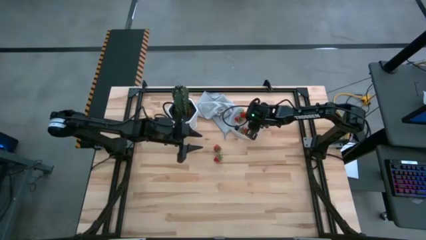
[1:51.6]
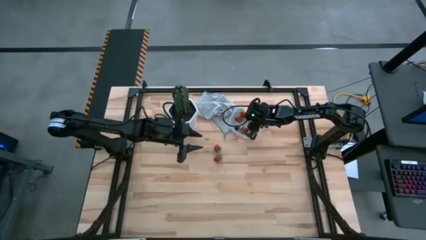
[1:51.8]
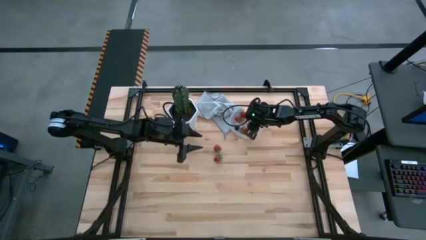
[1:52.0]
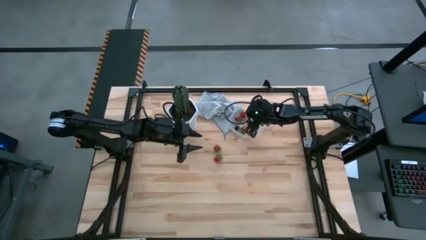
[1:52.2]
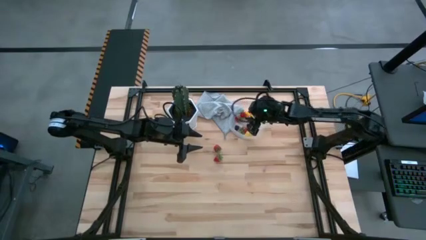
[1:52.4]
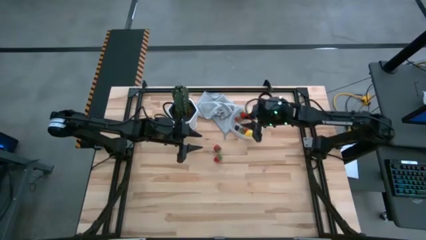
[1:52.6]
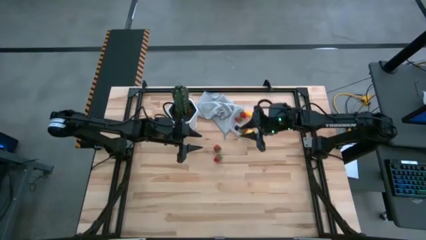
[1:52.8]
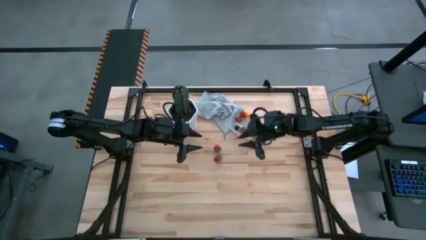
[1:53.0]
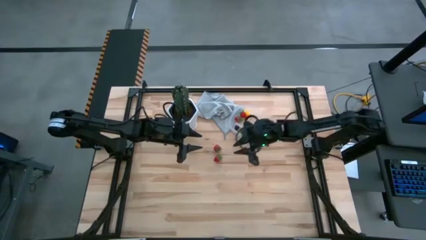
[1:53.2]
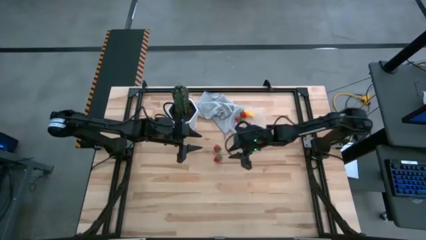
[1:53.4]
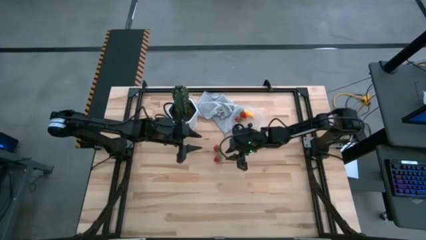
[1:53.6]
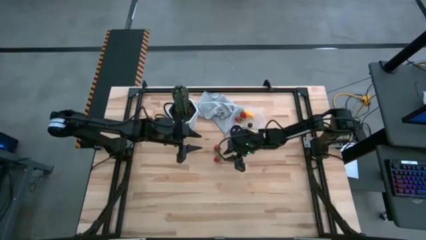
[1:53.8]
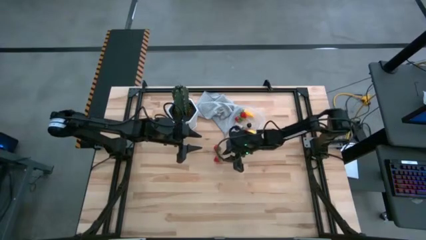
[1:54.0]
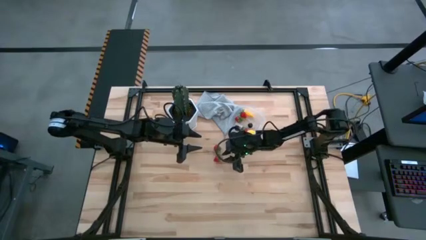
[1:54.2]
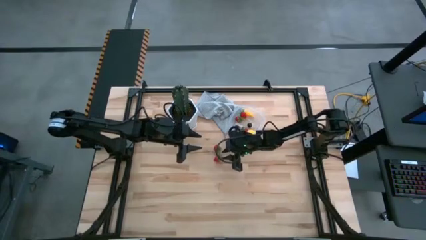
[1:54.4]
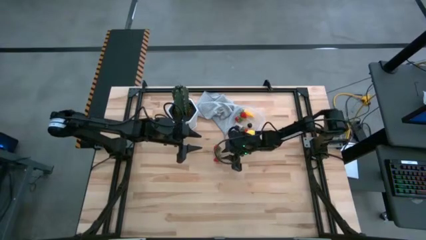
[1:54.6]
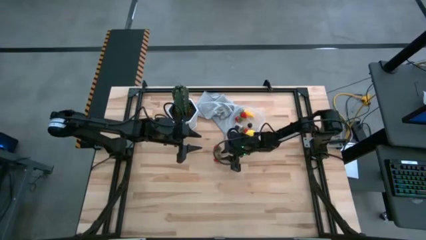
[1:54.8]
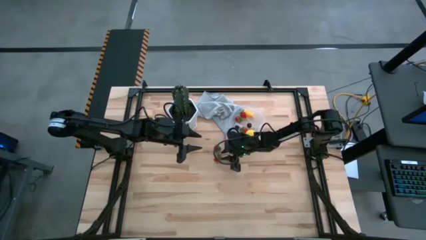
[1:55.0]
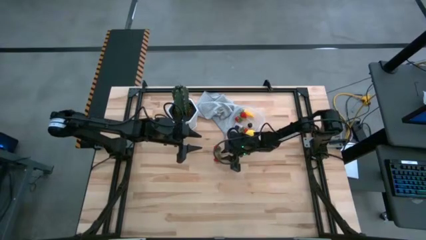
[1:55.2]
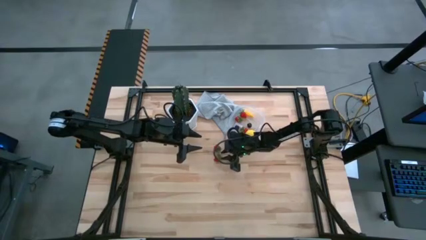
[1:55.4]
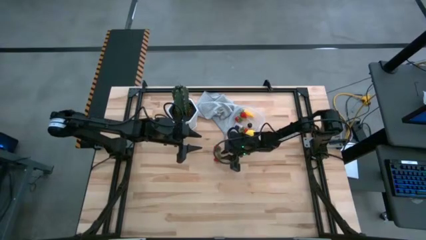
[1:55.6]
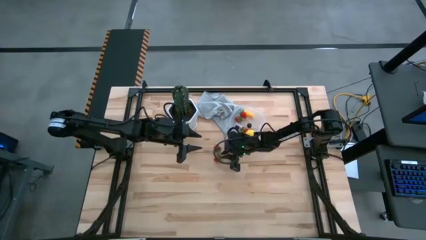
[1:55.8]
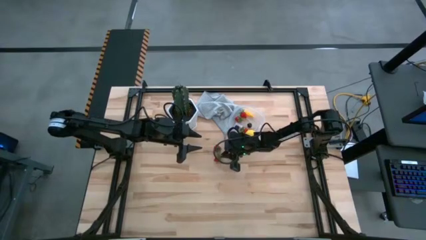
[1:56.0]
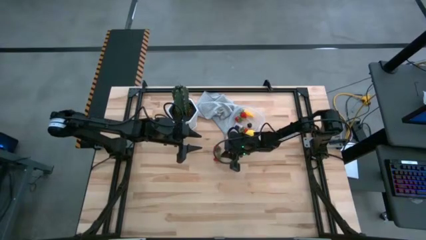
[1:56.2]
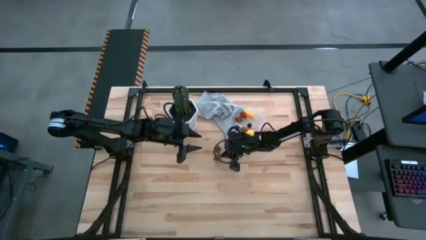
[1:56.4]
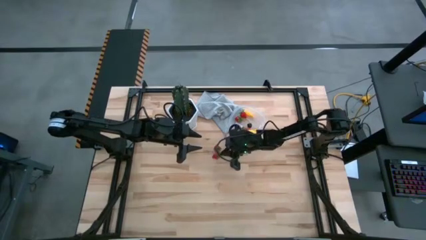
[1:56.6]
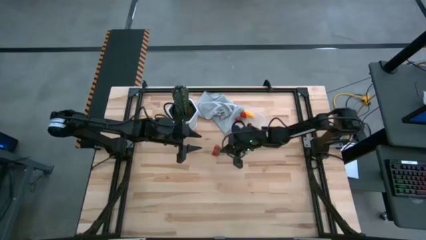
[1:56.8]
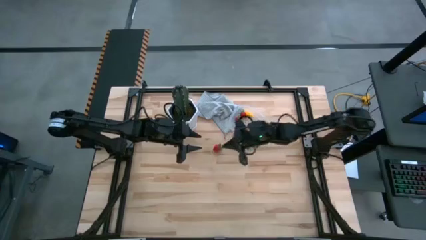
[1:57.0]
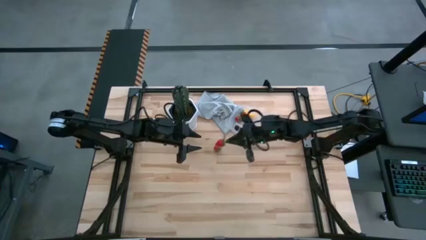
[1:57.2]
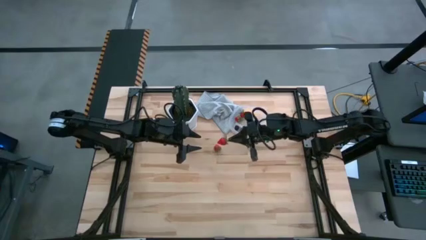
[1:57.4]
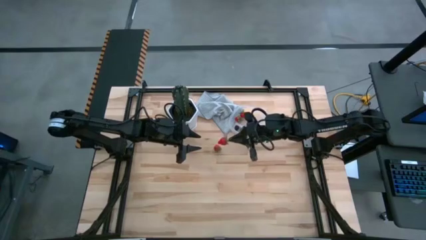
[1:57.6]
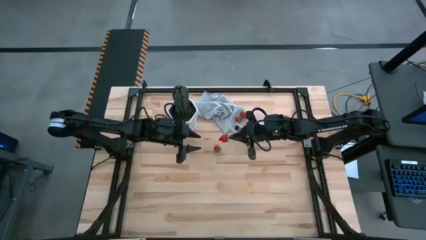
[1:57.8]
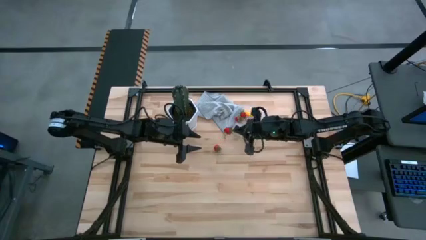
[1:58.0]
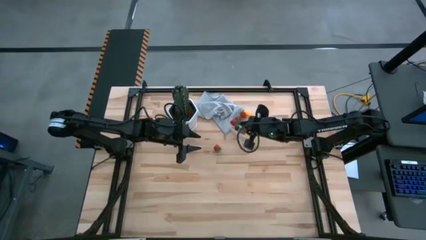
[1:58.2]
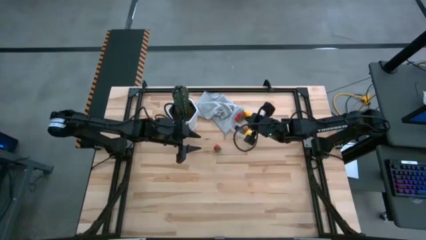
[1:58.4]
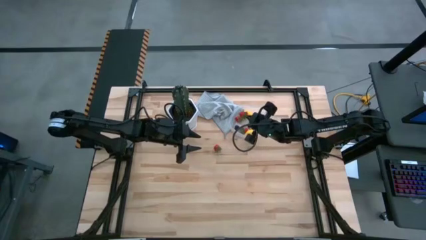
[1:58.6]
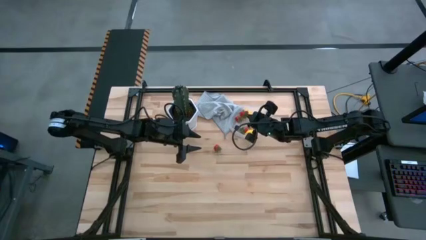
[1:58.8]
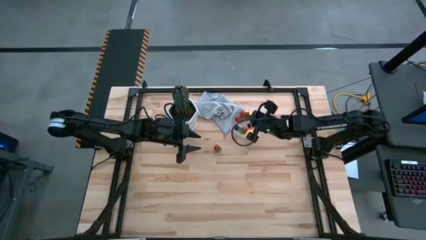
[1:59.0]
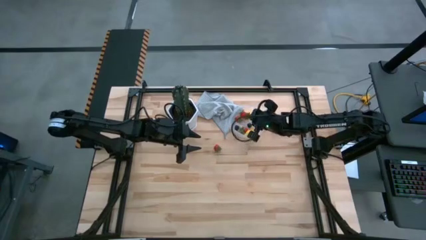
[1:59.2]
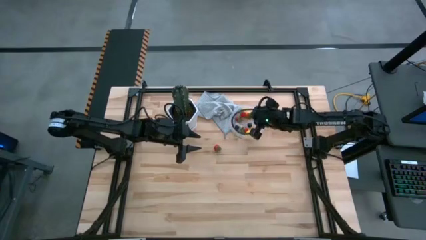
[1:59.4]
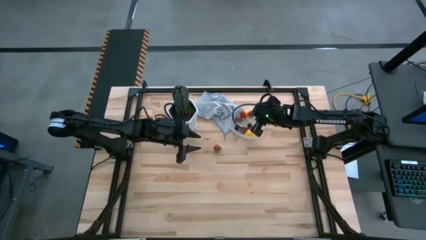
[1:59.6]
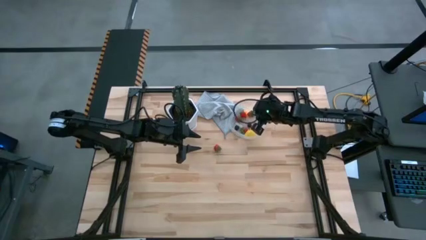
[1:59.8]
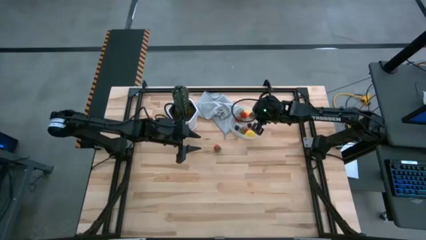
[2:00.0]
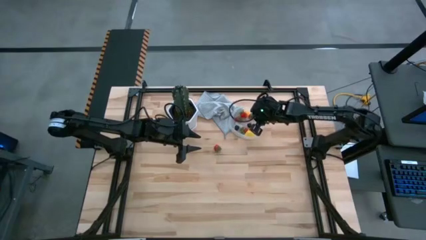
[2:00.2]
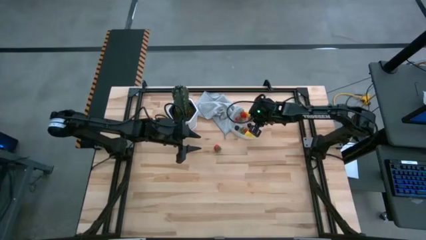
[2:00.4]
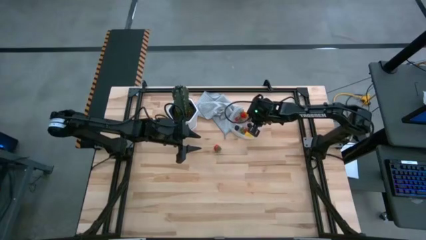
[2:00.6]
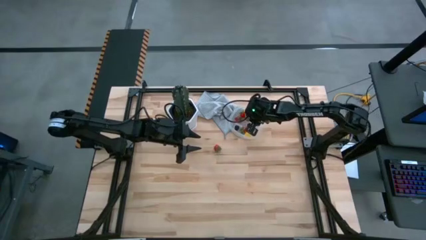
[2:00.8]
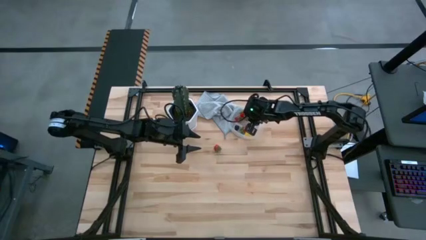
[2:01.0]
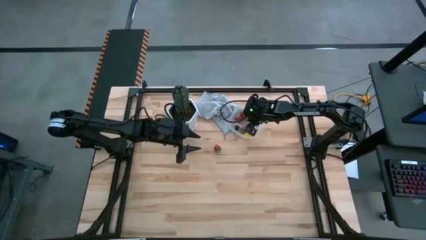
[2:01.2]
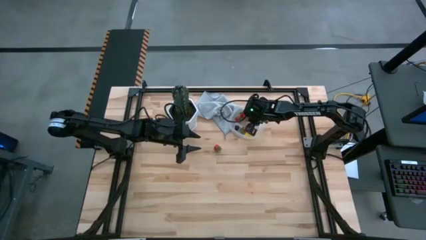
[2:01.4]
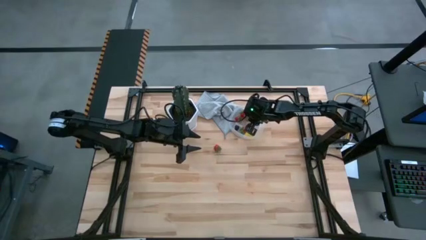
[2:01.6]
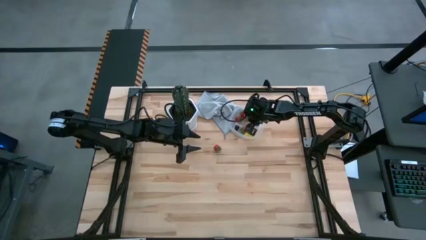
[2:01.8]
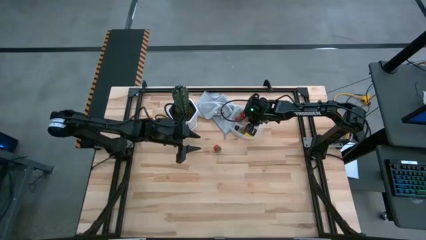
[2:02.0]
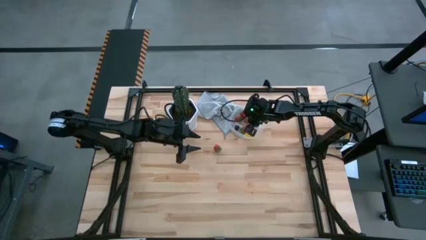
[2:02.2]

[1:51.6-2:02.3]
Task: Pick and placing Produce into tupperware
Put the bottom strawberry into the transparent bin

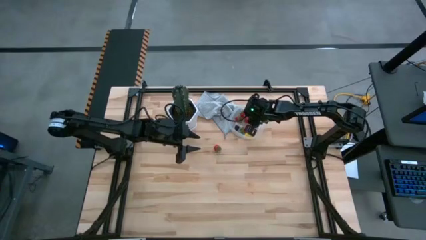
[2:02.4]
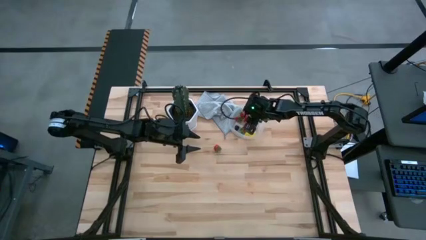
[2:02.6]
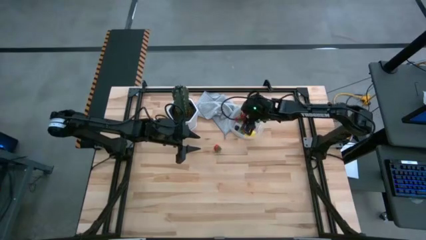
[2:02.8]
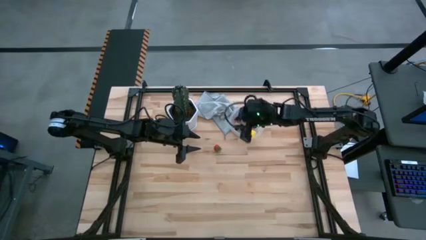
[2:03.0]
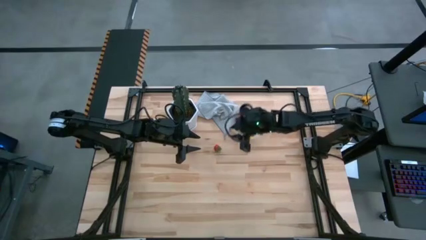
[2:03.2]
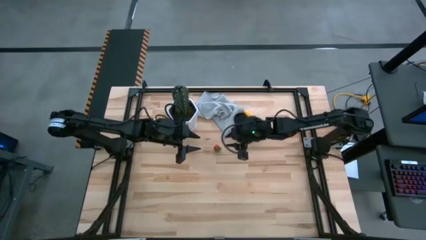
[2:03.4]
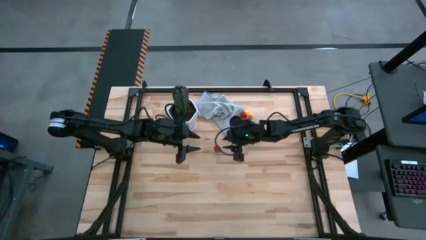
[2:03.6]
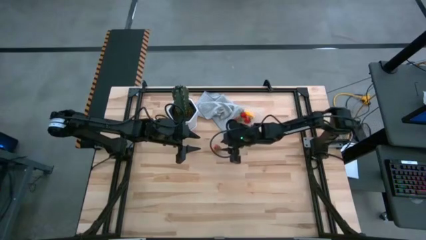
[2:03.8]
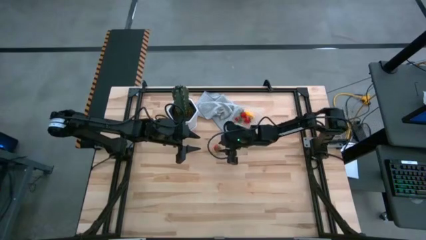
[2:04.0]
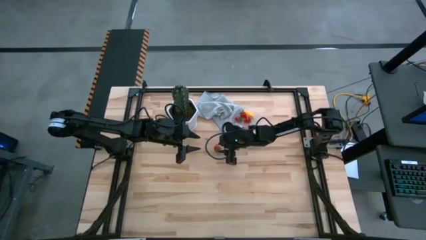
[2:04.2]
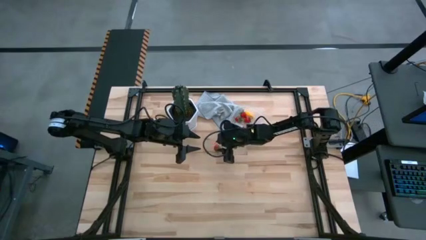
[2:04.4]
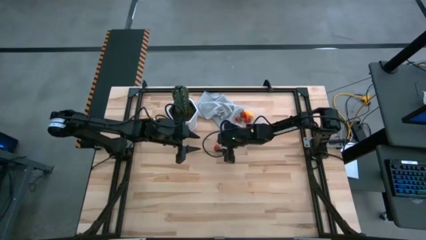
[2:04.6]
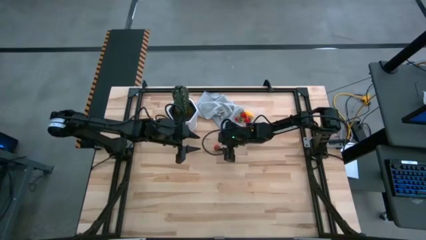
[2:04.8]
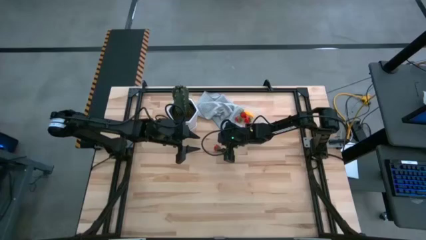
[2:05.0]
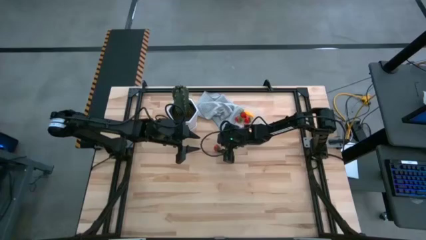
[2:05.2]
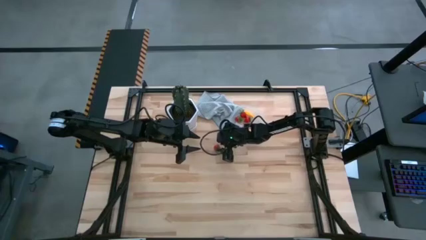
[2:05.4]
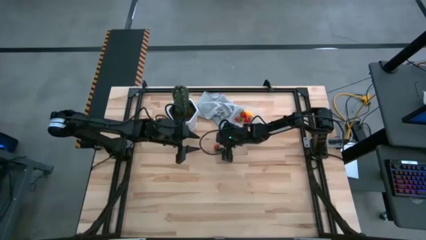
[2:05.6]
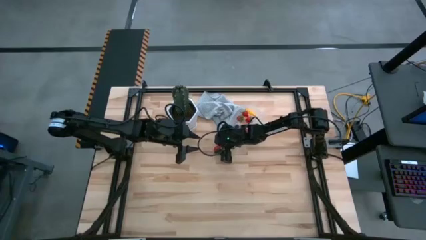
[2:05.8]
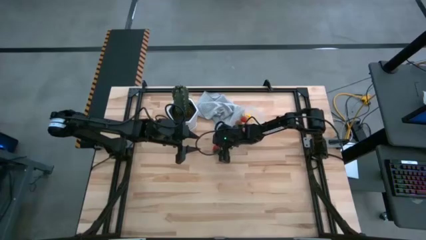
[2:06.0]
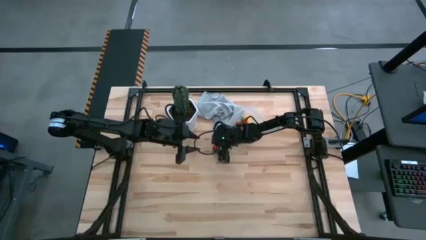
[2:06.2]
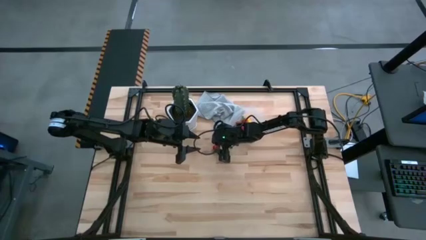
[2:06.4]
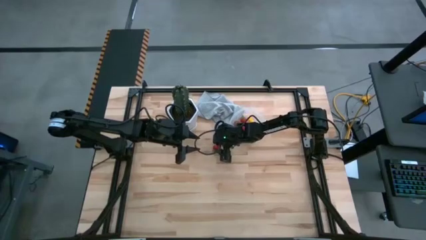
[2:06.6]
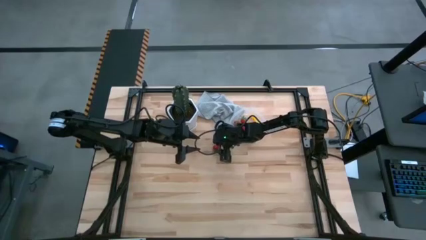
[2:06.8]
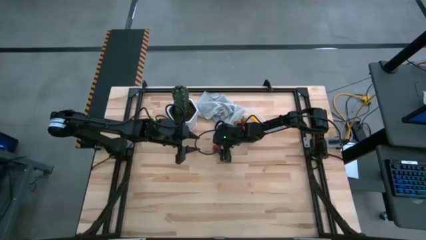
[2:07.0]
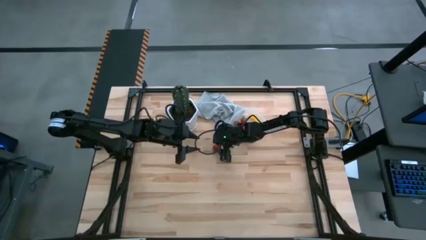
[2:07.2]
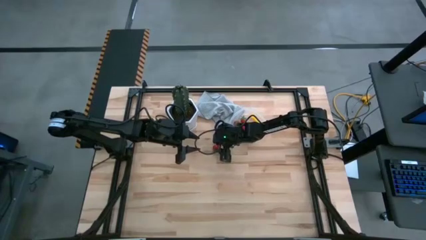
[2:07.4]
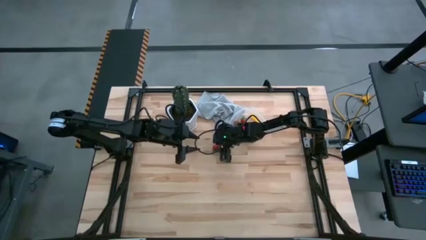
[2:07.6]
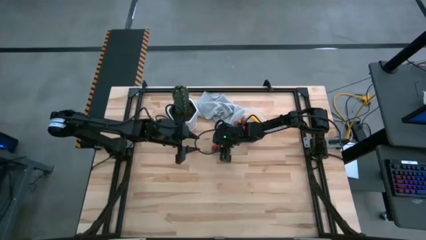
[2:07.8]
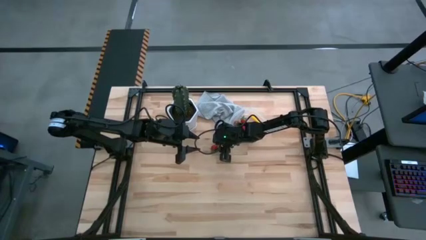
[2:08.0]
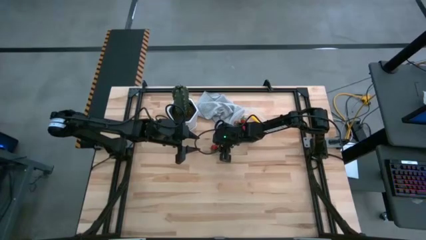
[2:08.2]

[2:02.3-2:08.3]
Put the strawberry into the transparent bin

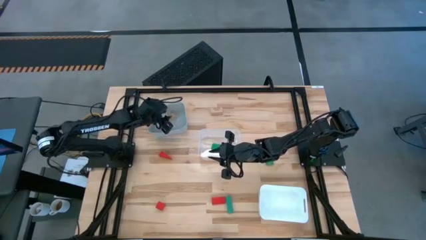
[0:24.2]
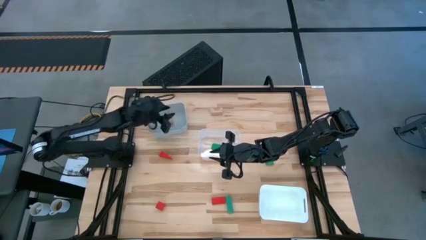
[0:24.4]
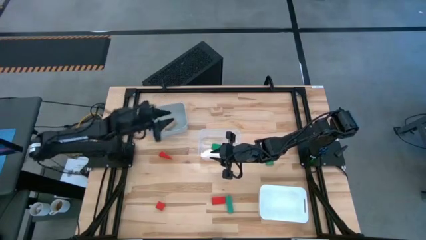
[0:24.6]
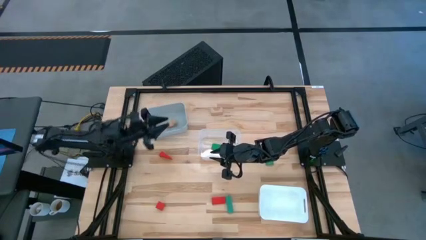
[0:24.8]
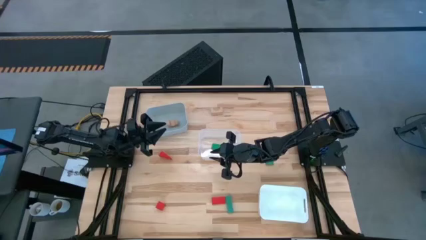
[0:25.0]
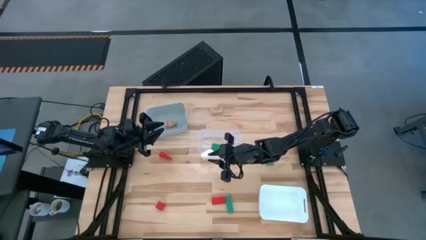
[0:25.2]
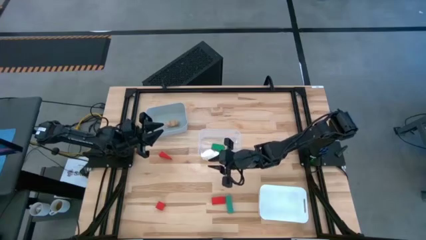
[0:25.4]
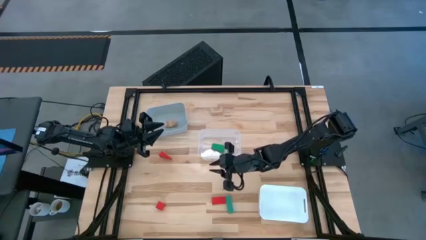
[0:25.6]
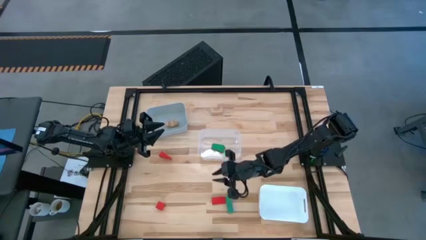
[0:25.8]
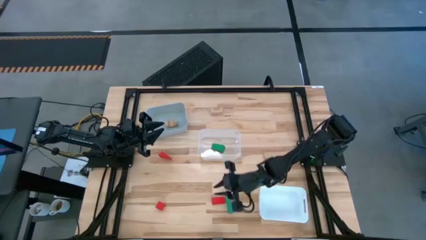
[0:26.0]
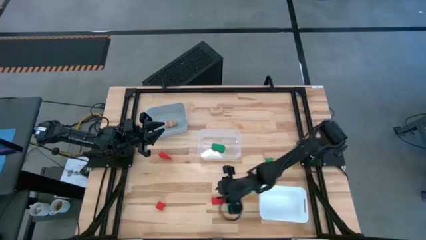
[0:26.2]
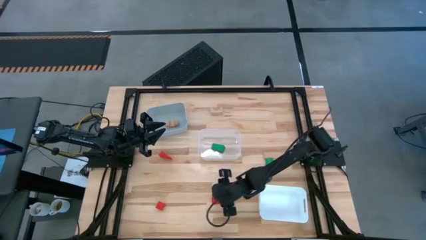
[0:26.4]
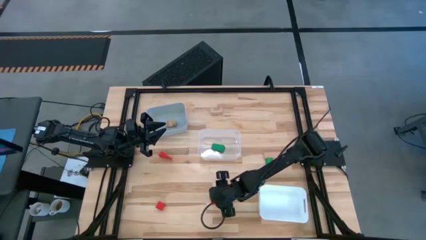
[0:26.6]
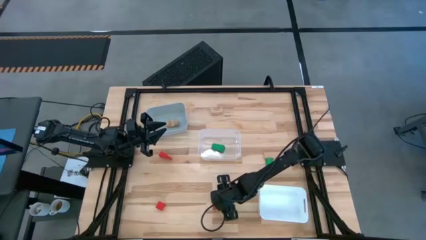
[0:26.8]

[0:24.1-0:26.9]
Task: Sort & place blocks by color
Put the bottom right red block into the white bin
